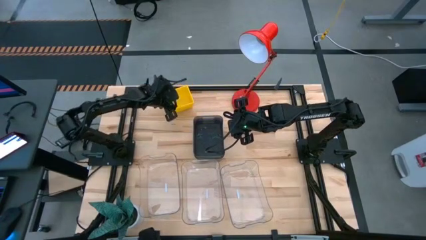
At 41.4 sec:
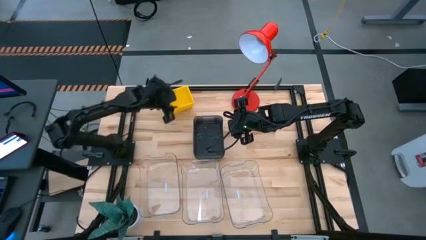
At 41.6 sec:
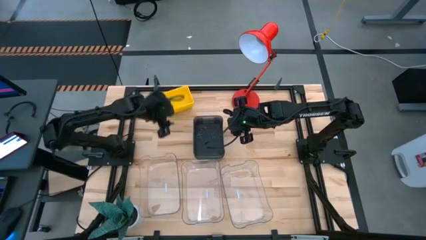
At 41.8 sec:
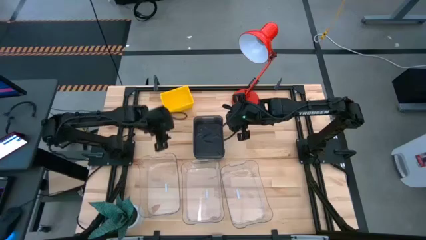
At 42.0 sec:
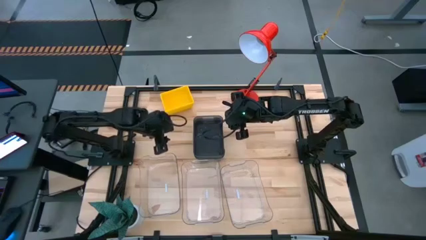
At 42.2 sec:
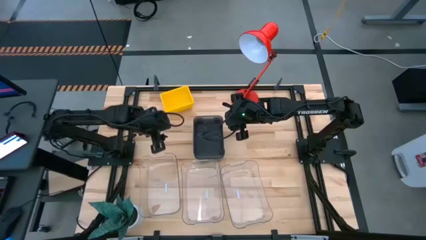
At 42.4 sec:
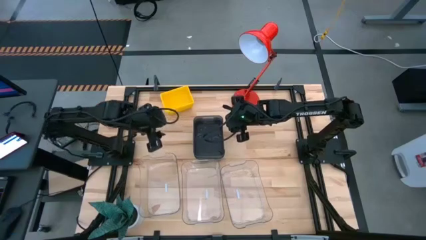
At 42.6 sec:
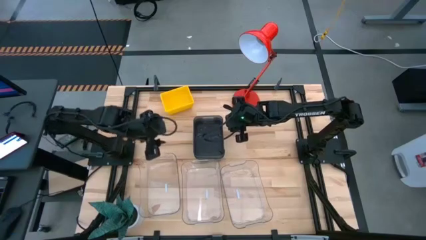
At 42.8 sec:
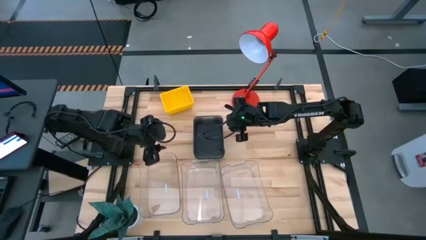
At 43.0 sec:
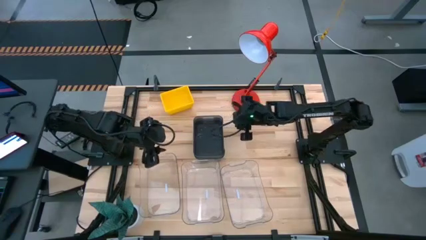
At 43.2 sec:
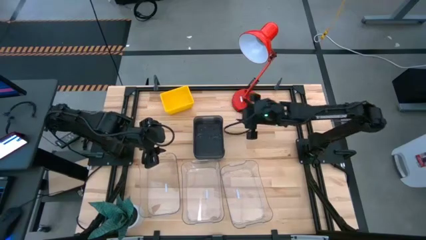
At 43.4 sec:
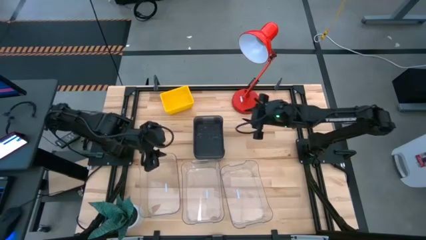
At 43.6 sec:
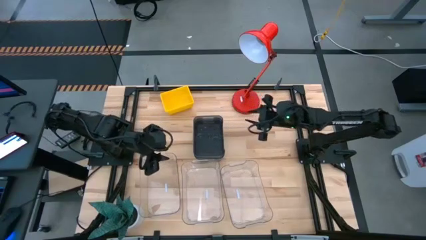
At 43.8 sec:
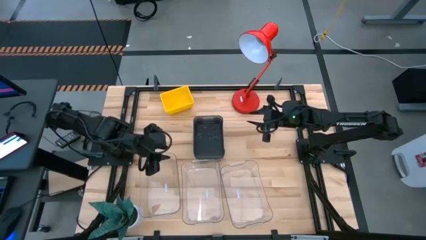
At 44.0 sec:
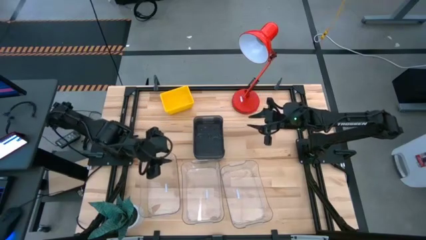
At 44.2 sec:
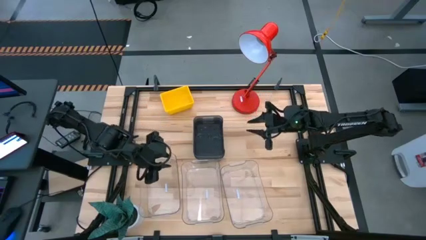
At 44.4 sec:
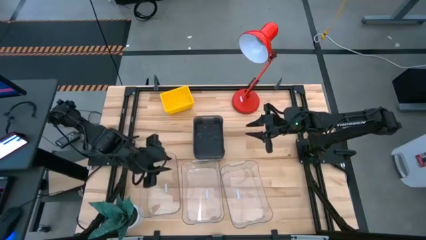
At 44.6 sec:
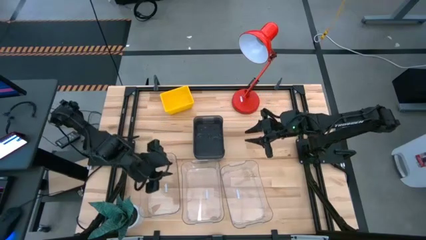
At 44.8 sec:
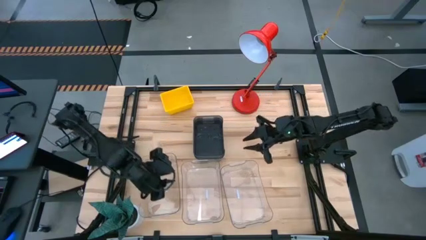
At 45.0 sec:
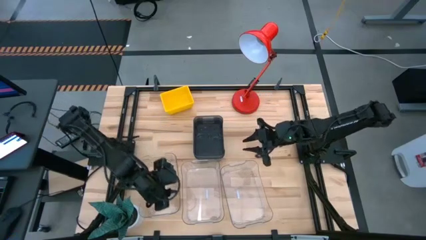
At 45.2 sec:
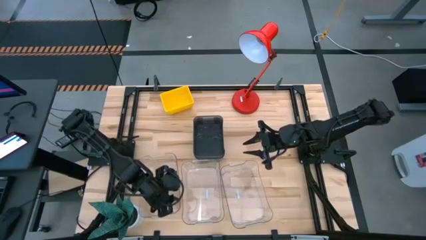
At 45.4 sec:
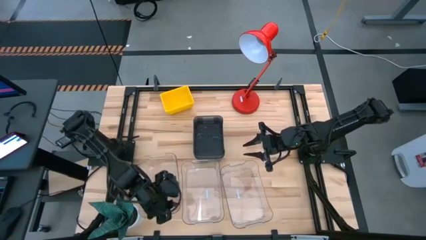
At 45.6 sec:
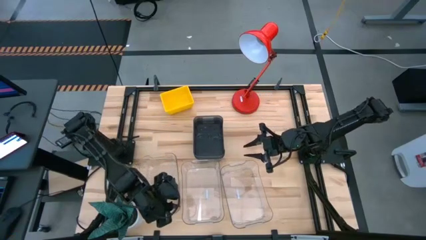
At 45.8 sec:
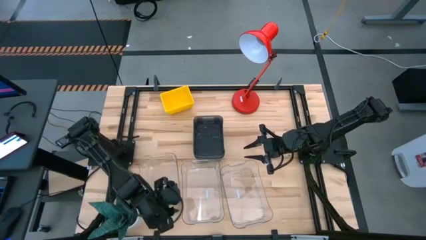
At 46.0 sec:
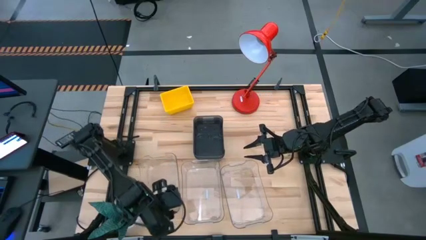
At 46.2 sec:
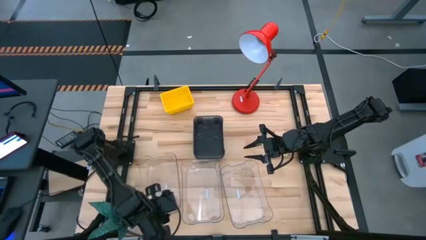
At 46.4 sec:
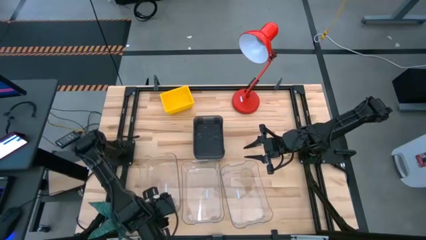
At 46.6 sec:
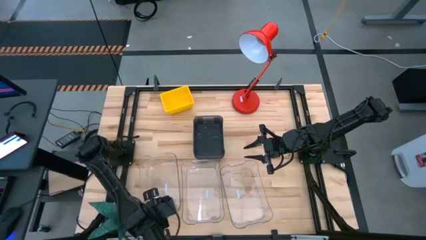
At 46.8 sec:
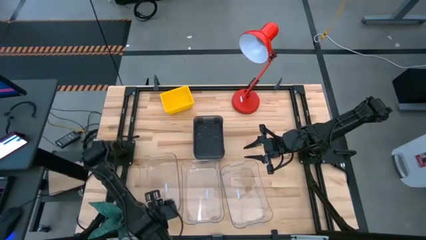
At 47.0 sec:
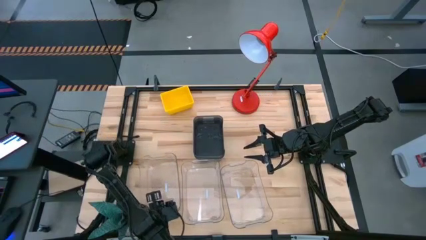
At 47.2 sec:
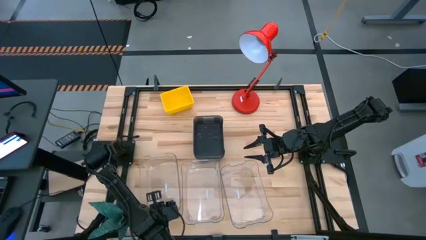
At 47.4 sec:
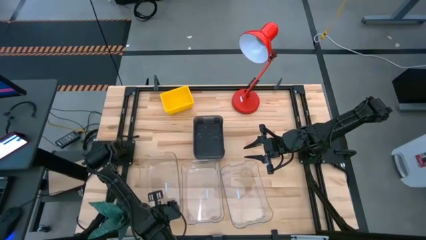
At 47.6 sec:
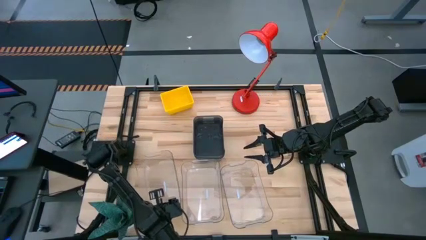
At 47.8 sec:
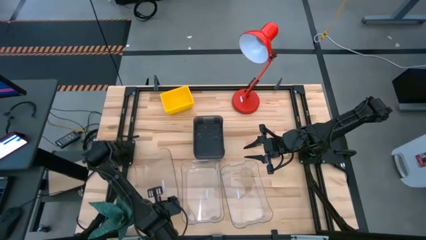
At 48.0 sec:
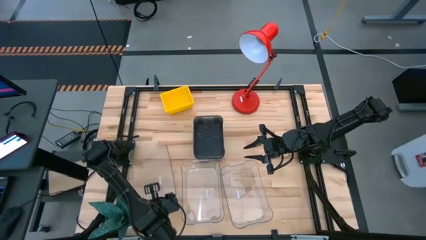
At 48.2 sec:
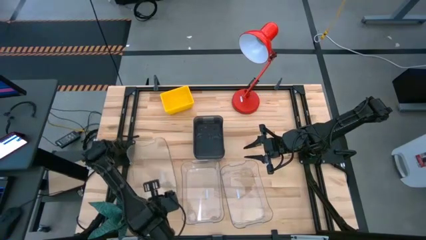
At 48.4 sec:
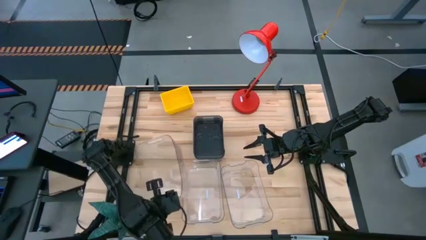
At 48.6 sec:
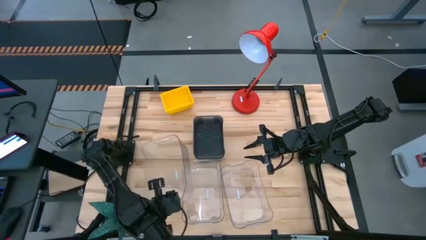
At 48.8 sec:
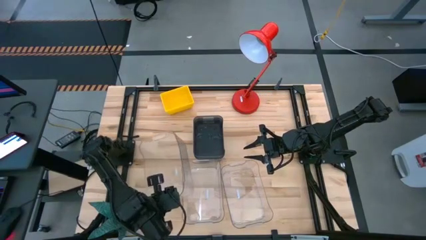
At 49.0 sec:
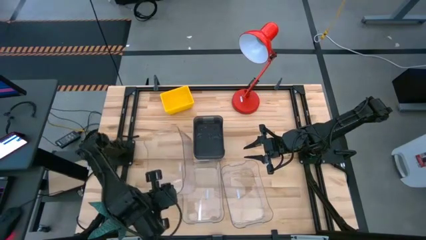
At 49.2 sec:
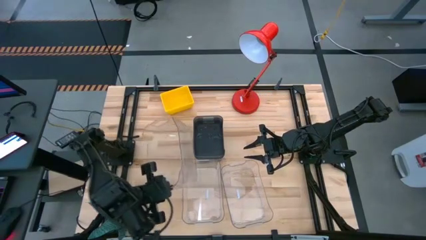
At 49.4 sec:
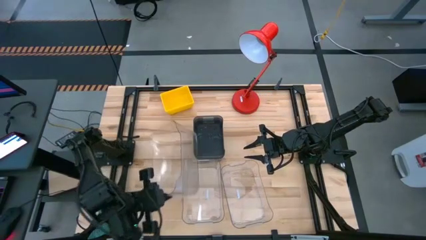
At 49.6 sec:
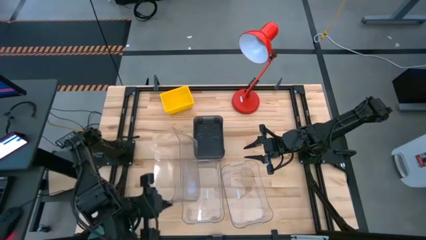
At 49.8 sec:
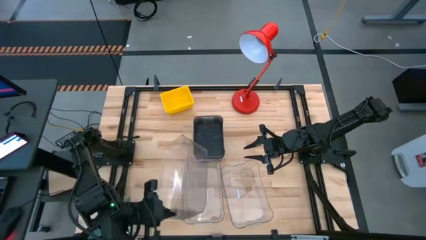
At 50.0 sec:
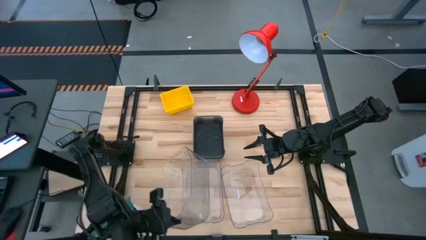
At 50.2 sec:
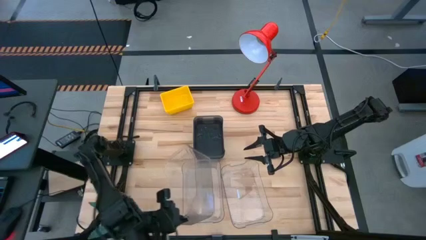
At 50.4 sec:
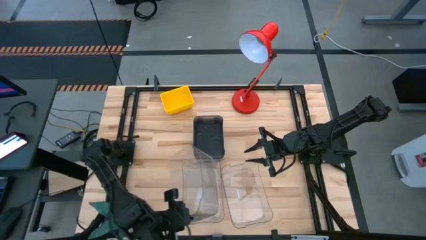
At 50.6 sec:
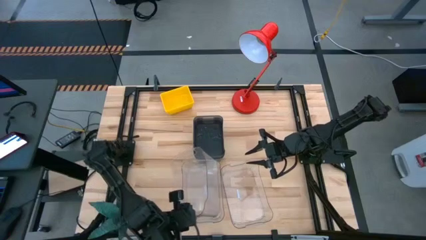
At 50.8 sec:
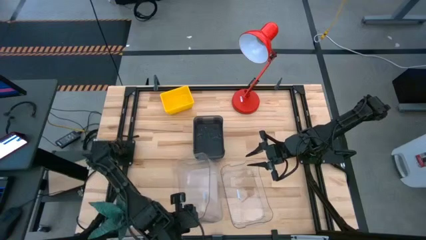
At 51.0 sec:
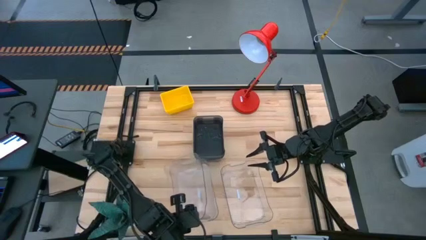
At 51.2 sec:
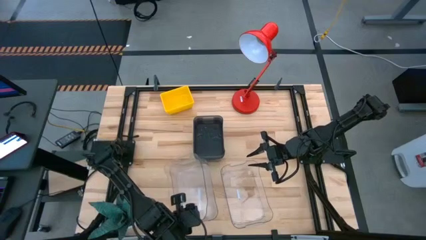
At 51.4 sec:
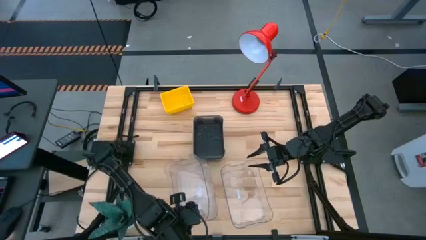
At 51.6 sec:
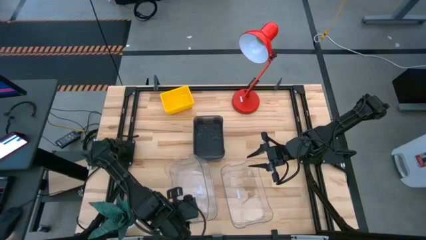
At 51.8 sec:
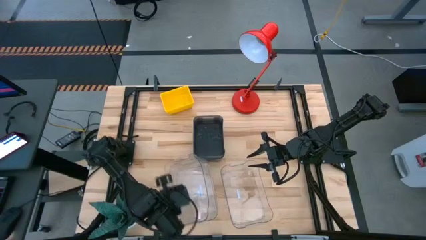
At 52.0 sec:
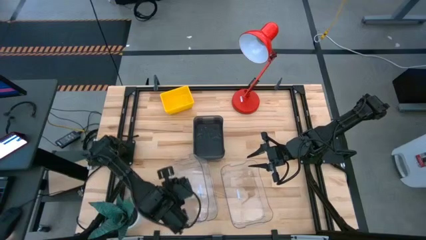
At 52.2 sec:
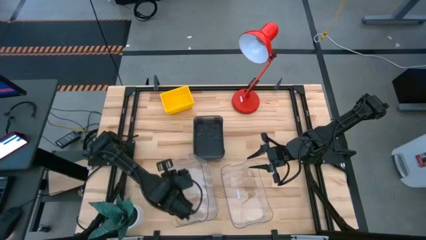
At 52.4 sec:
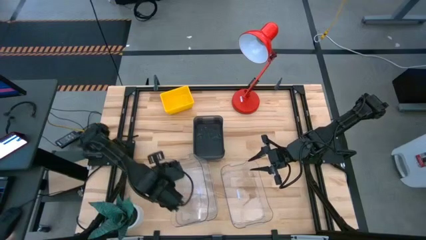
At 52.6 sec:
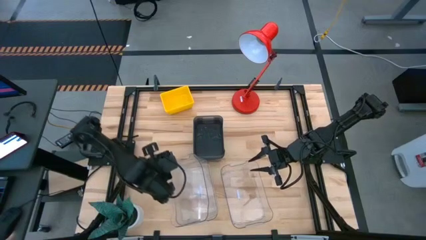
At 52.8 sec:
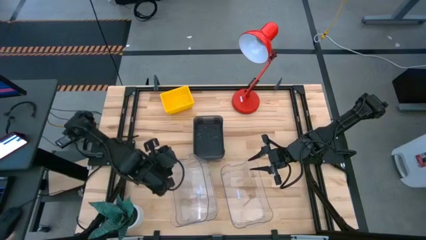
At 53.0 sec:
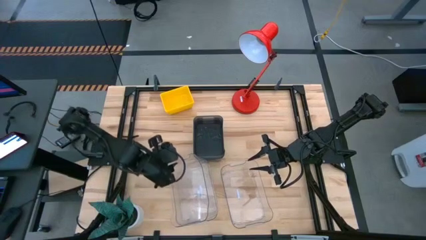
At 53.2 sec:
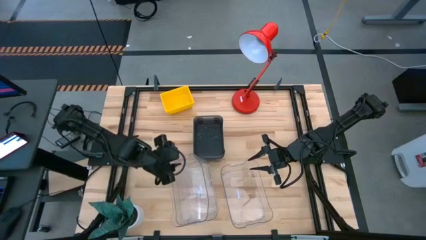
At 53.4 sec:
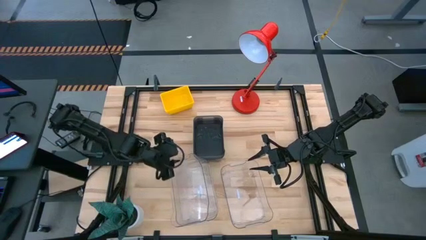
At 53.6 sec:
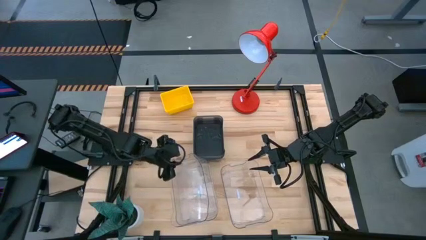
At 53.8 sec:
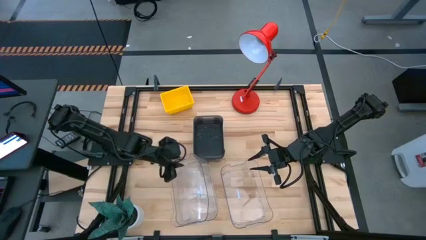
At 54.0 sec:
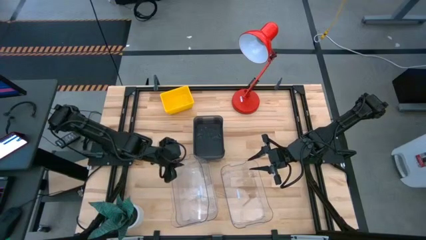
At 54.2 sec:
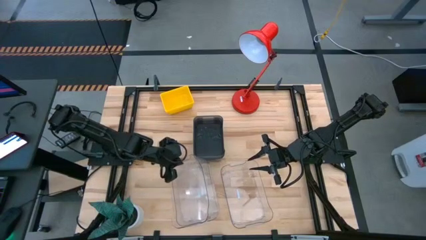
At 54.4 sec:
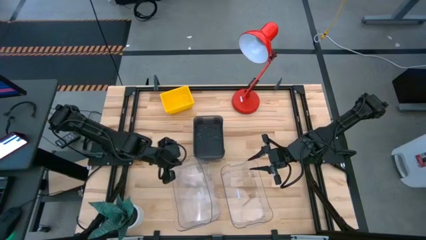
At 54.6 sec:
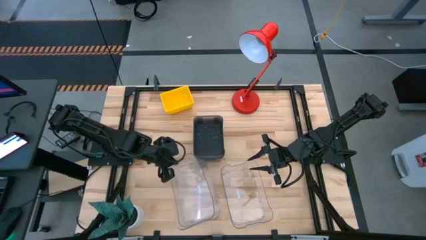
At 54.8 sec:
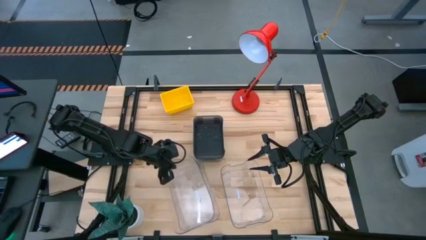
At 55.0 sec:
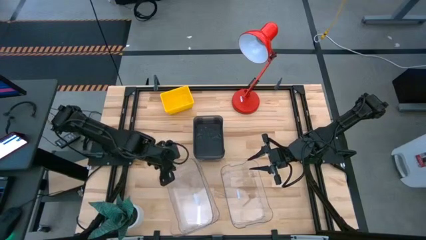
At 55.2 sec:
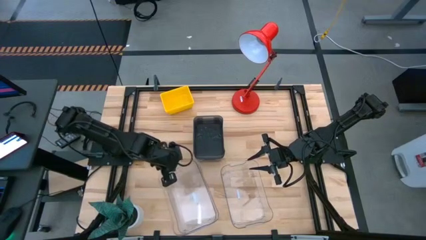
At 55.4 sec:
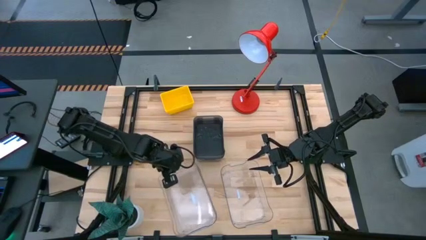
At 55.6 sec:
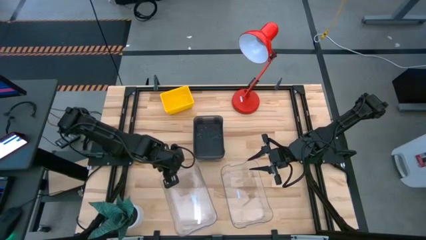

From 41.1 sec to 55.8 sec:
Stack the left transparent bin on top of the middle transparent bin

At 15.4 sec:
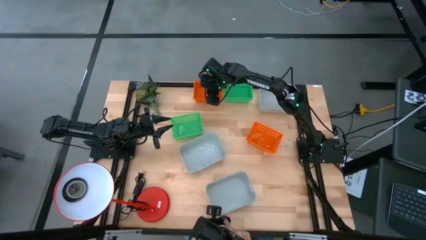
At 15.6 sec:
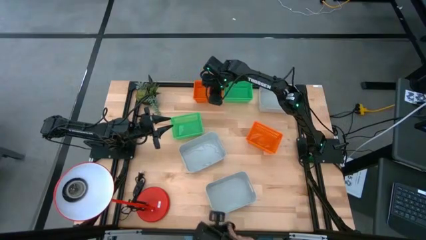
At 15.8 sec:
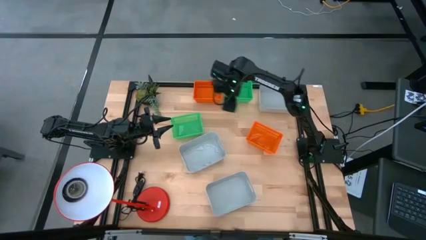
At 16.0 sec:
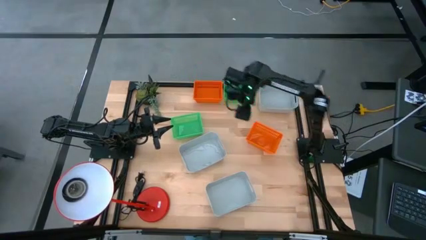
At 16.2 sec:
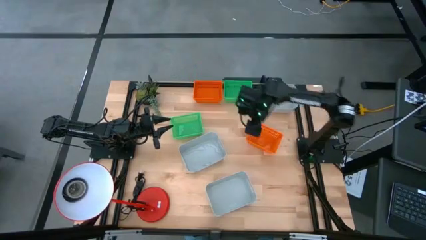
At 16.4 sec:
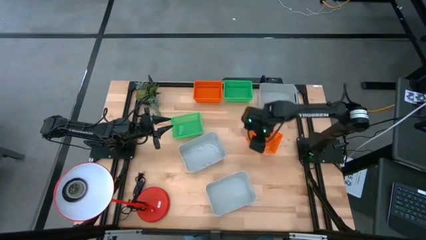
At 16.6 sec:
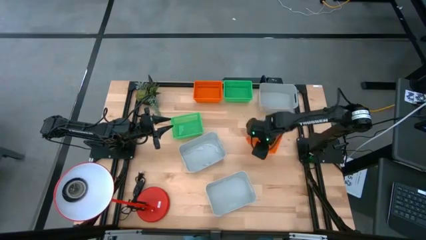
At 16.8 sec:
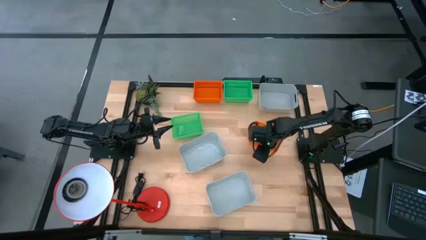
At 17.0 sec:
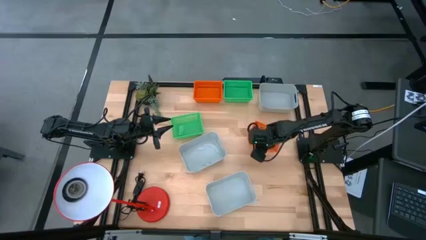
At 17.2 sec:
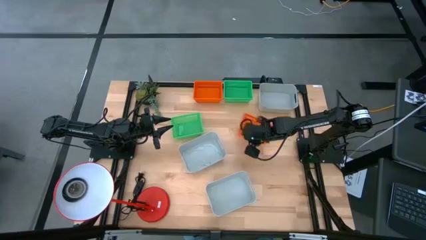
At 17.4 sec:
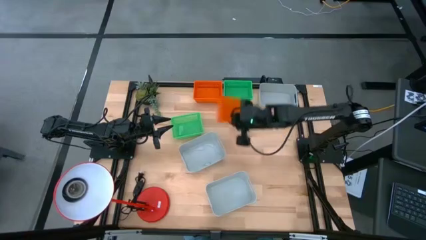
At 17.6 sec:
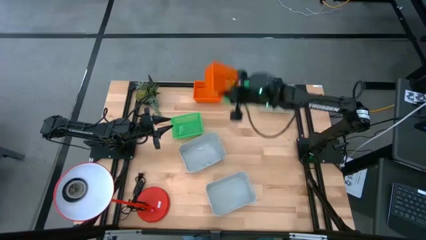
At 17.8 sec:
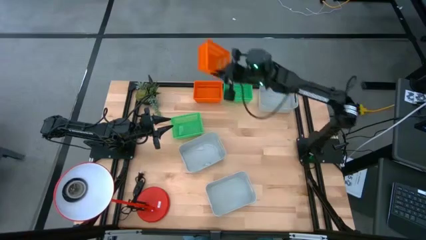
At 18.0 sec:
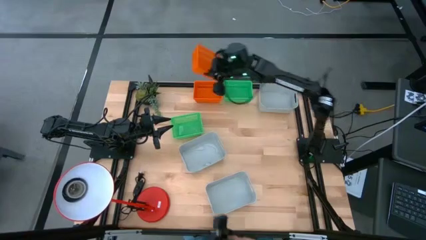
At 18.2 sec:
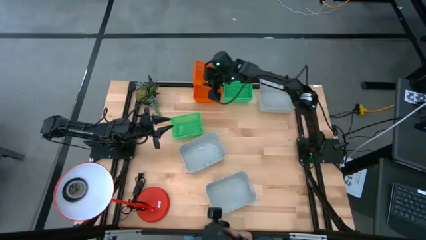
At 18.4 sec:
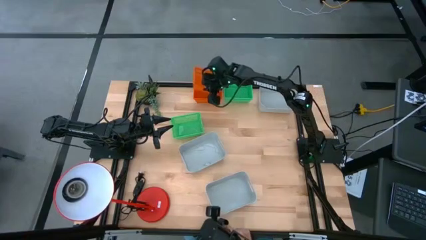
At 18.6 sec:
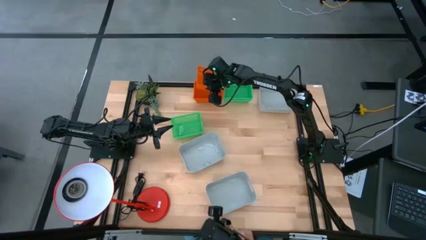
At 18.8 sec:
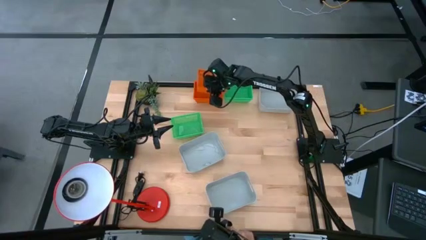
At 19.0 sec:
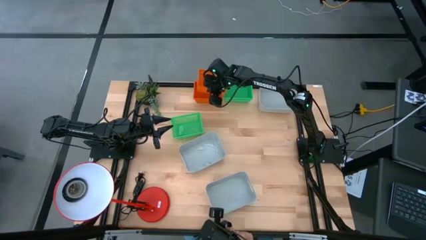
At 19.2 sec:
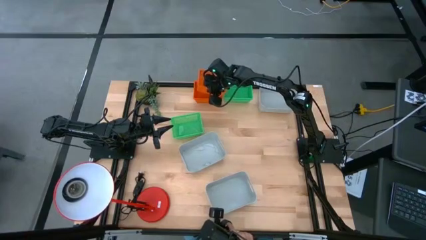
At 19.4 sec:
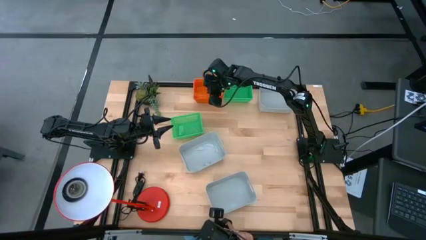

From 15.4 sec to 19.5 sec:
Stack the bottom orange bin on the top orange bins
